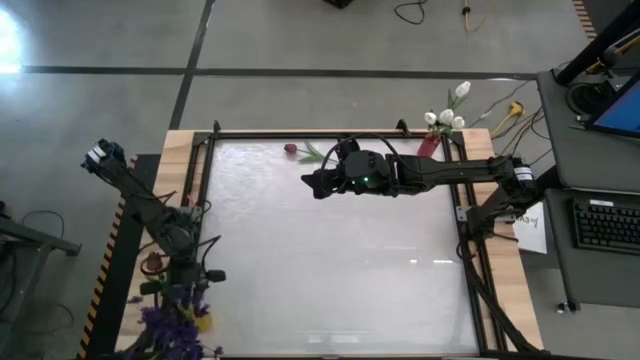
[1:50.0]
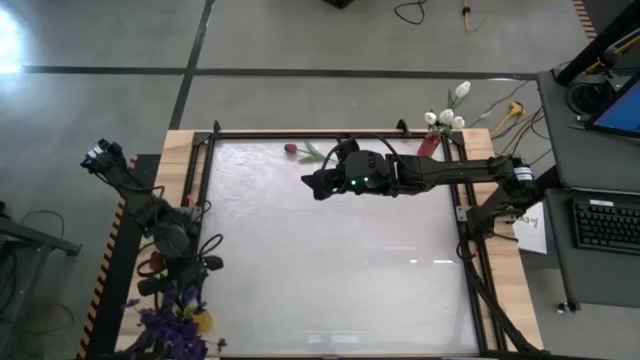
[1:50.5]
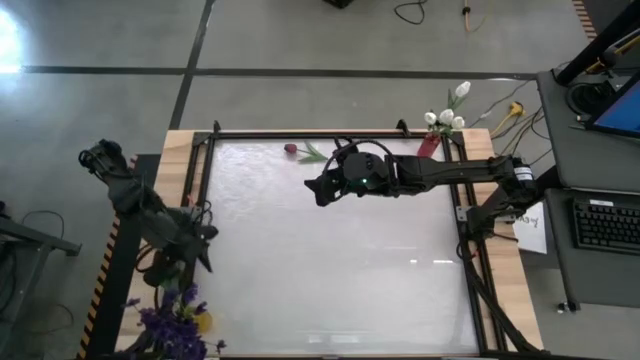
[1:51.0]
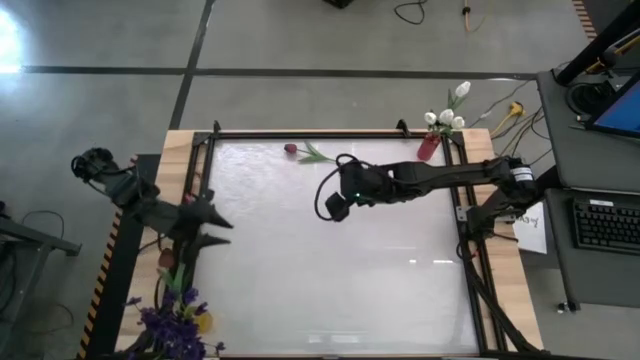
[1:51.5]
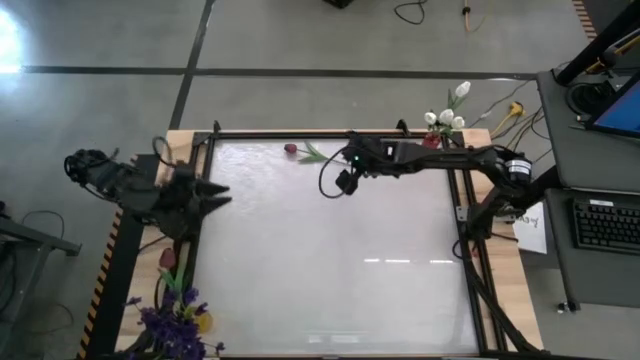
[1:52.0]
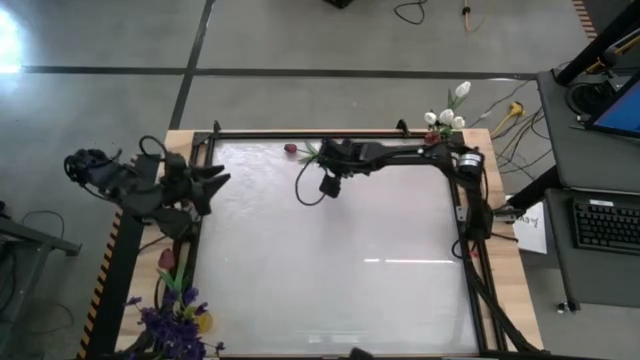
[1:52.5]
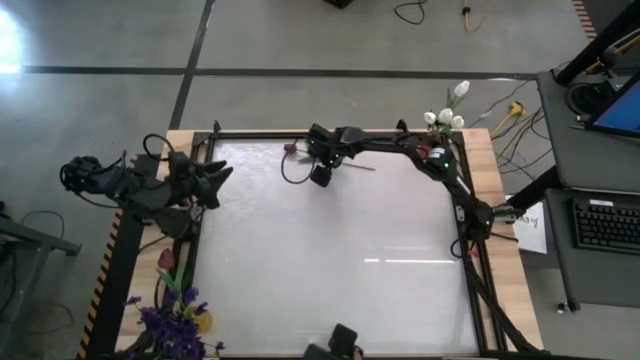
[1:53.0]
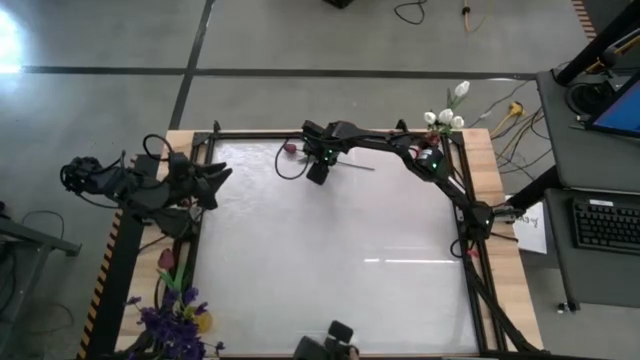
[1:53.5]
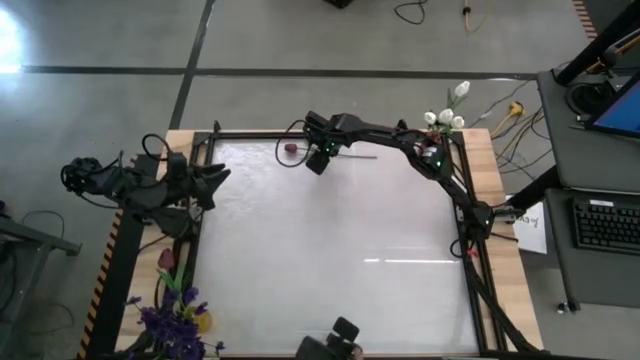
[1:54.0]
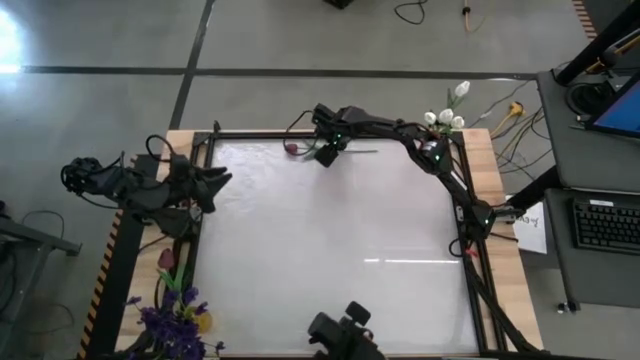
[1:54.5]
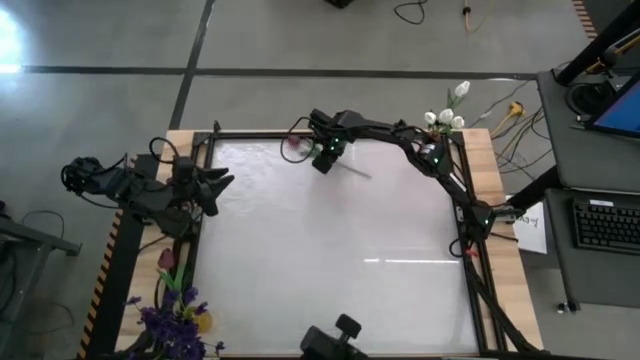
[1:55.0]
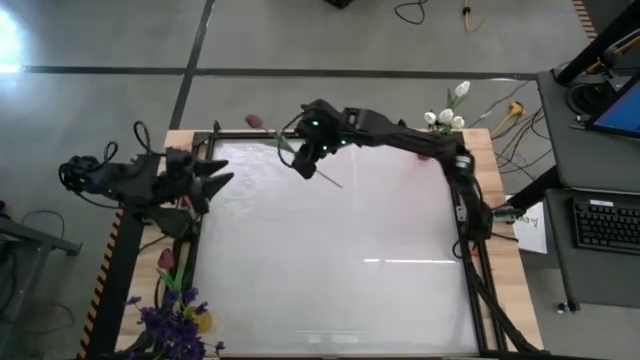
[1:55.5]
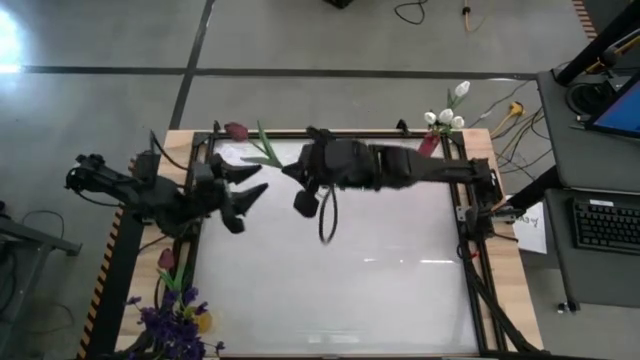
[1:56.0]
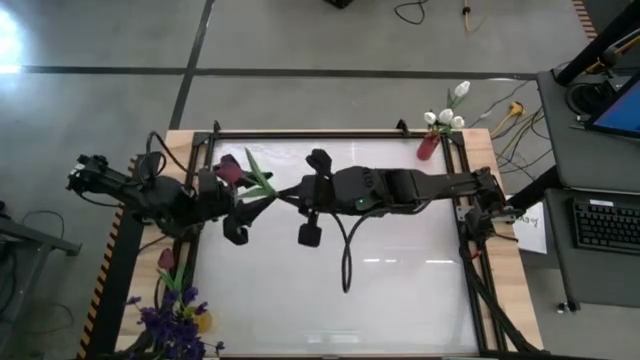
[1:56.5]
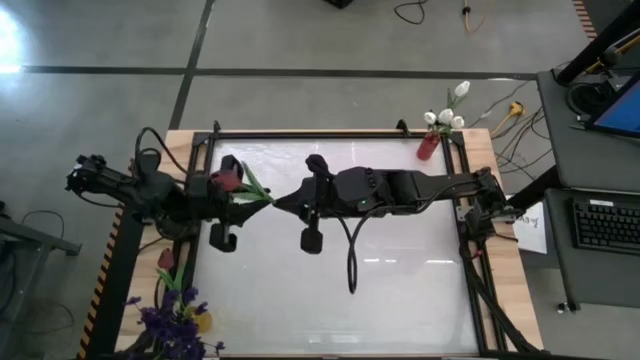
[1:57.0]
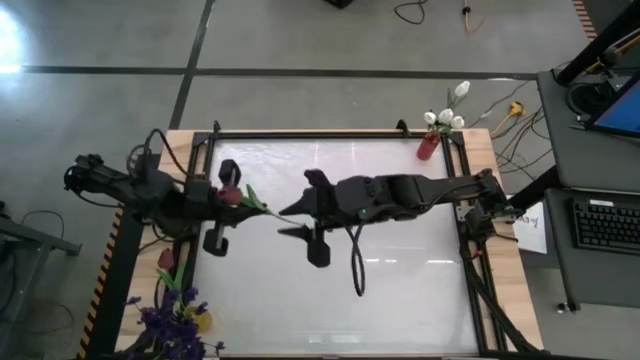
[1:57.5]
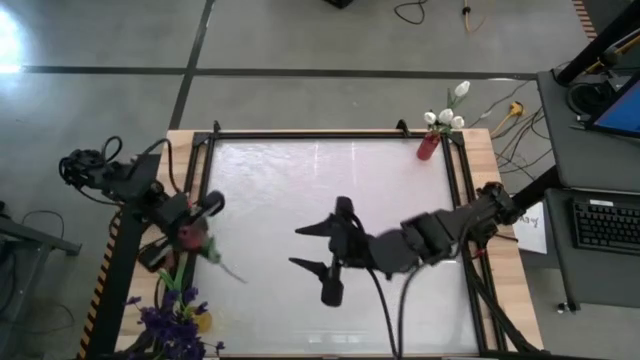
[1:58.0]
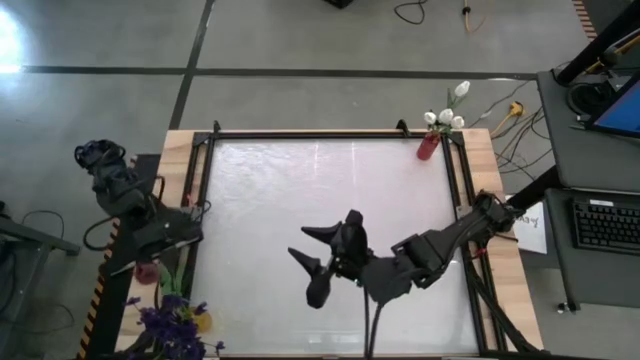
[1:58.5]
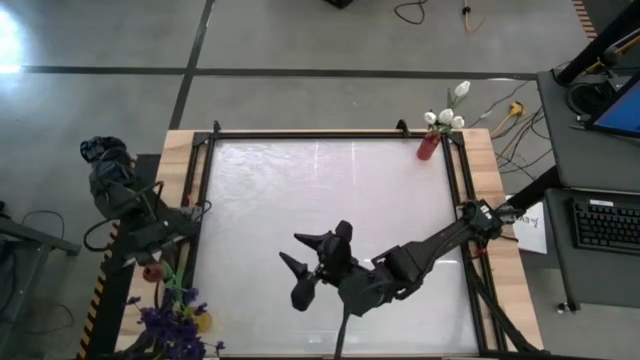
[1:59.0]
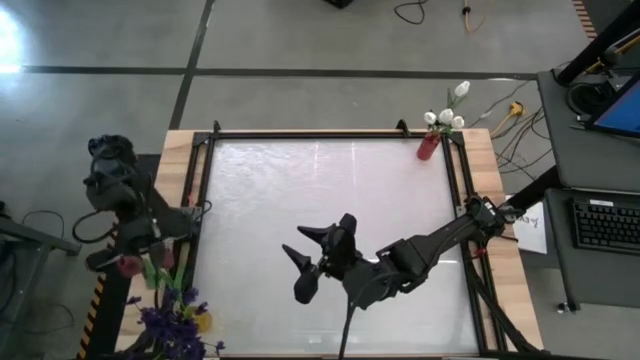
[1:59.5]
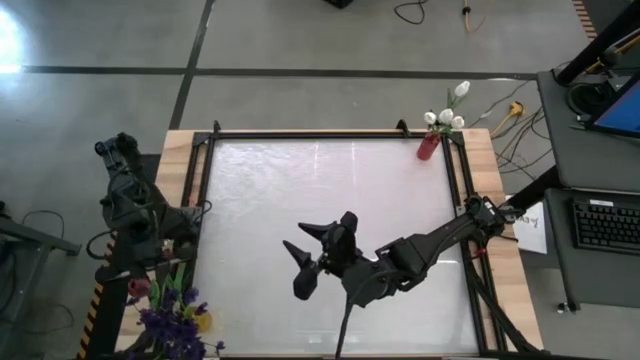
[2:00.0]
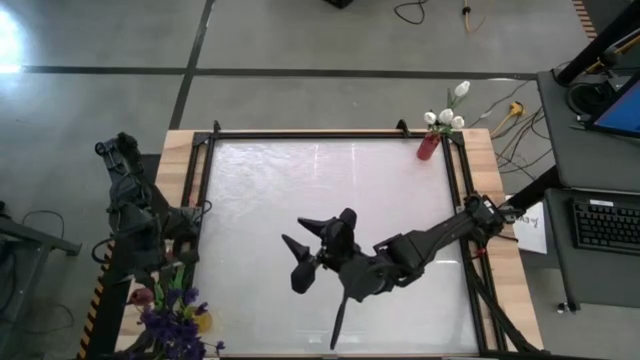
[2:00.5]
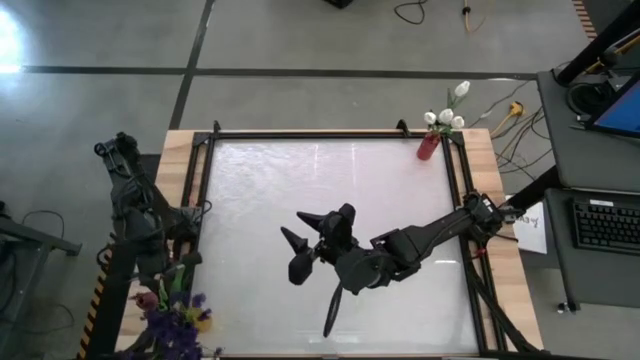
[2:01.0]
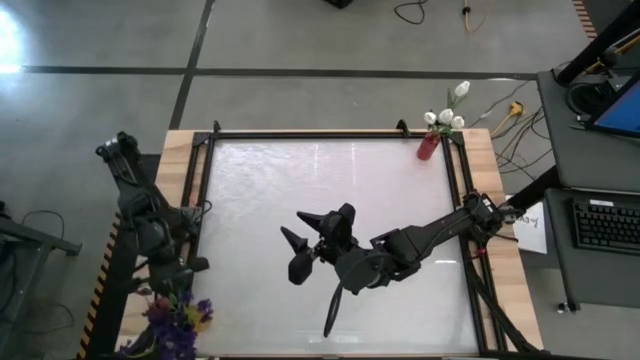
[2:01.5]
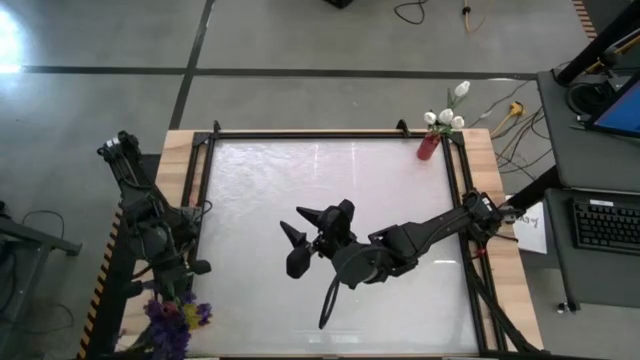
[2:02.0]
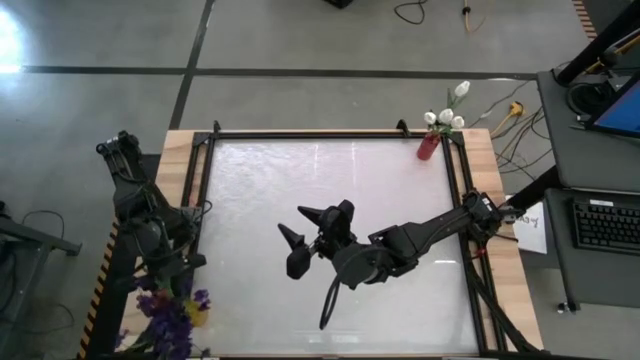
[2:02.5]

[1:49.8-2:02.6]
Task: Sort flowers into vase by color
Put the red tulip into the yellow flower vase

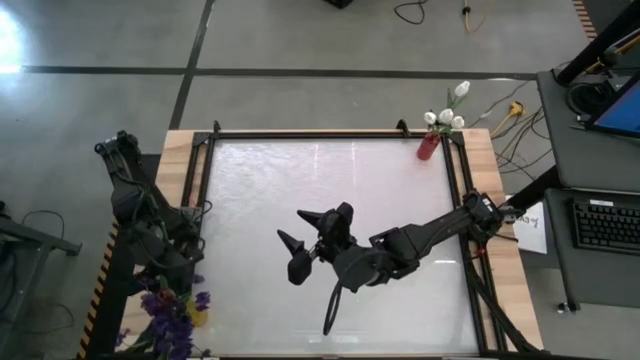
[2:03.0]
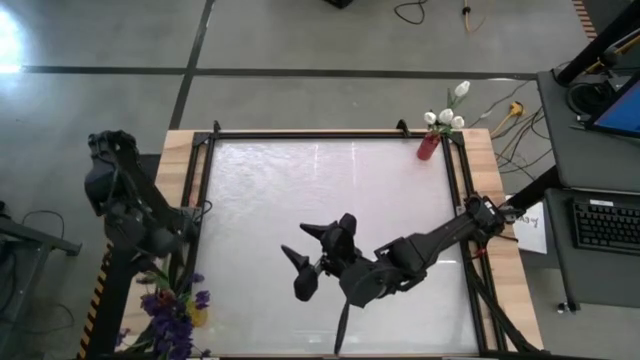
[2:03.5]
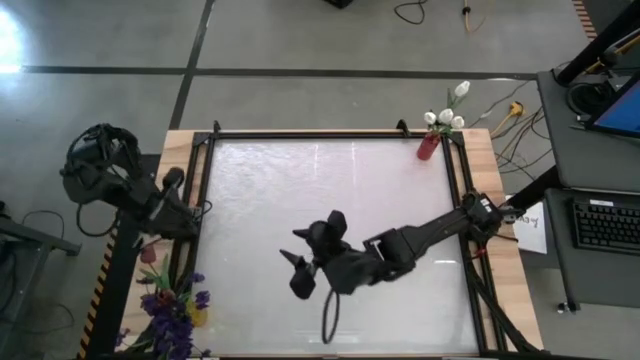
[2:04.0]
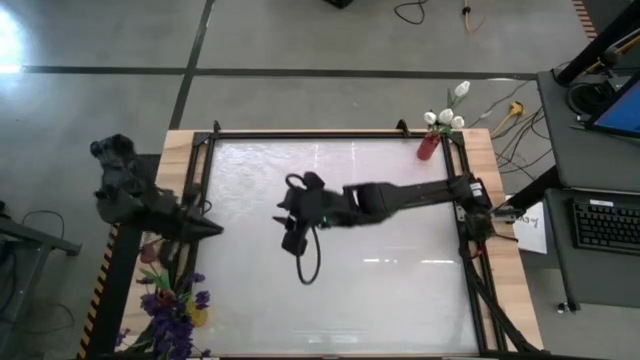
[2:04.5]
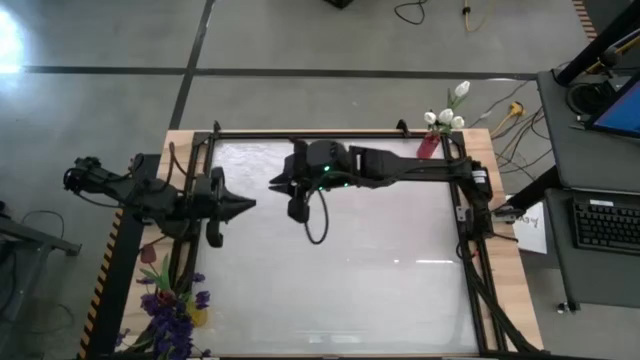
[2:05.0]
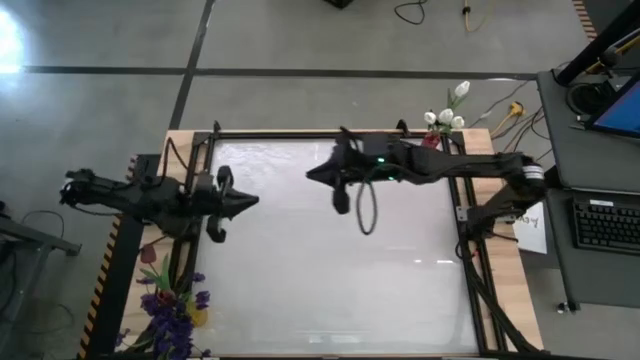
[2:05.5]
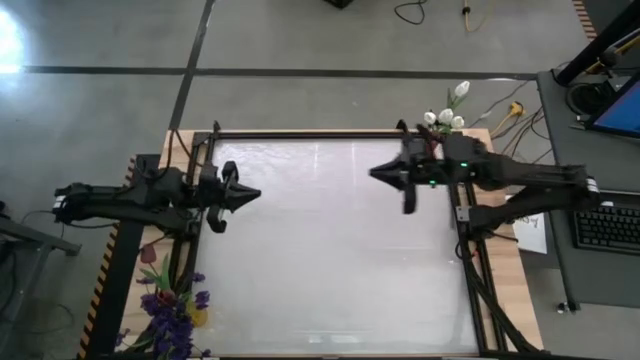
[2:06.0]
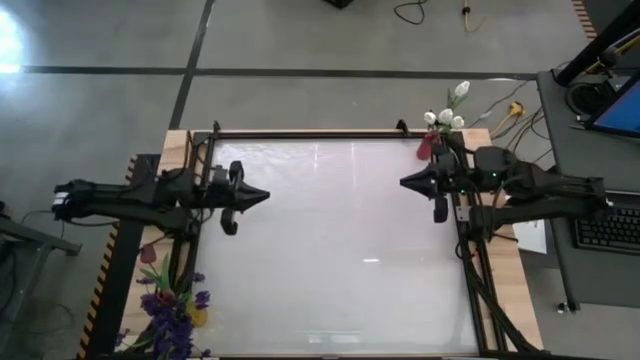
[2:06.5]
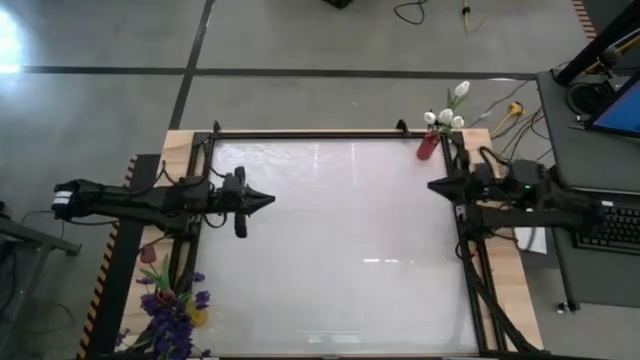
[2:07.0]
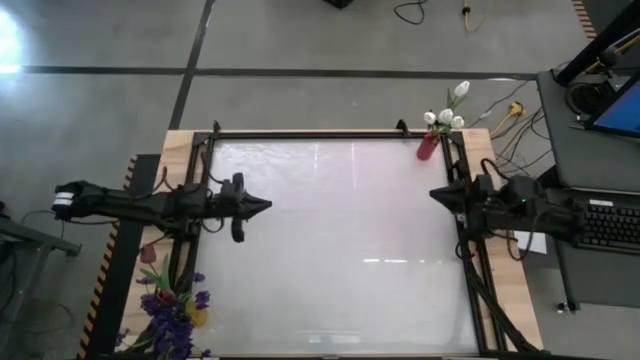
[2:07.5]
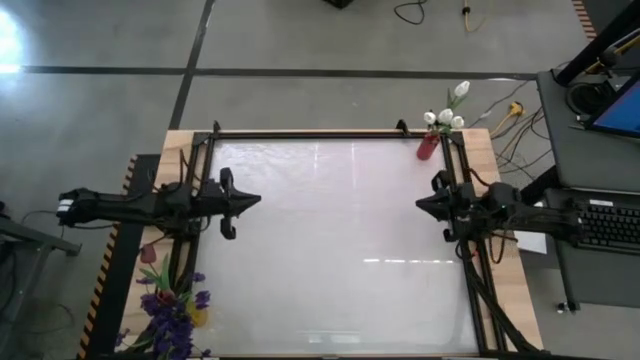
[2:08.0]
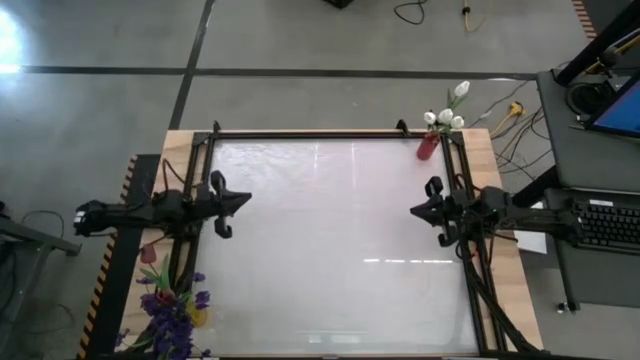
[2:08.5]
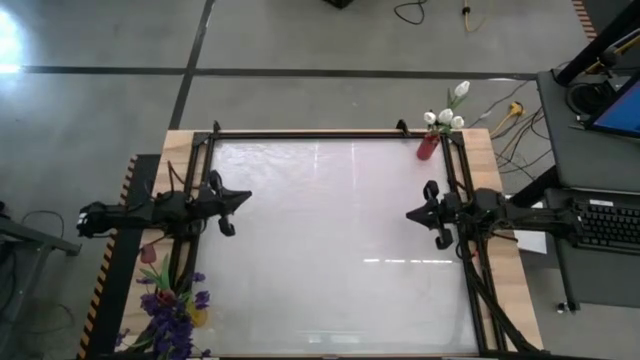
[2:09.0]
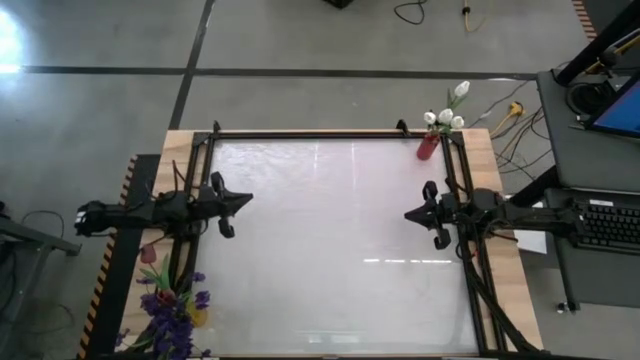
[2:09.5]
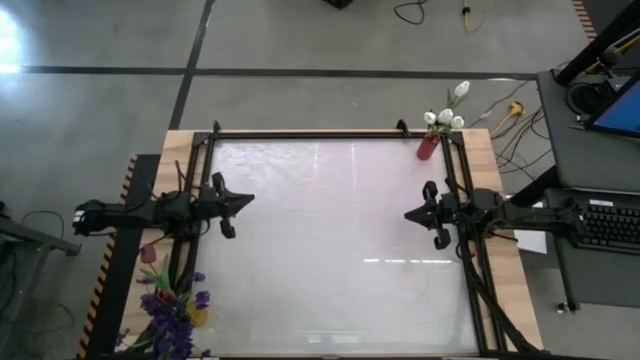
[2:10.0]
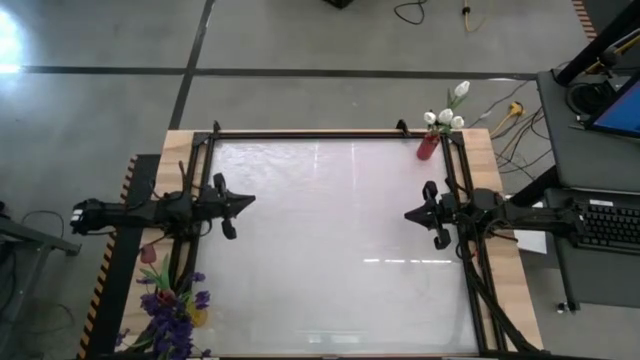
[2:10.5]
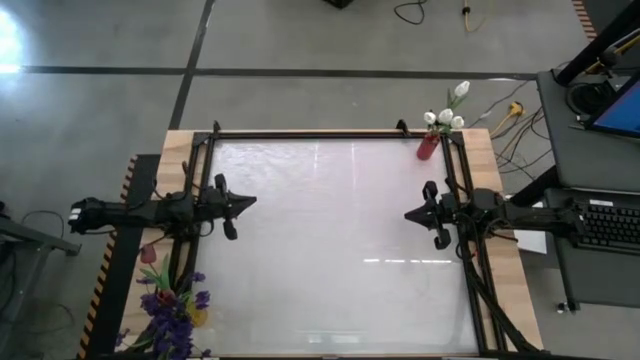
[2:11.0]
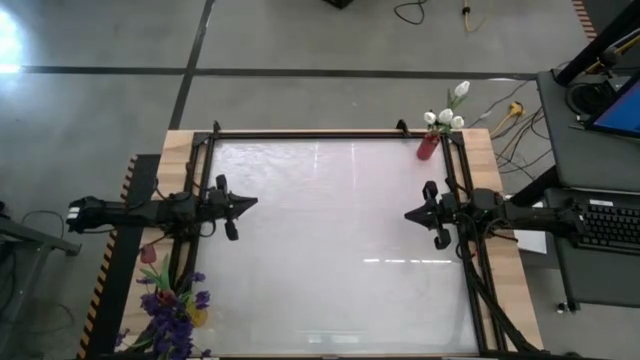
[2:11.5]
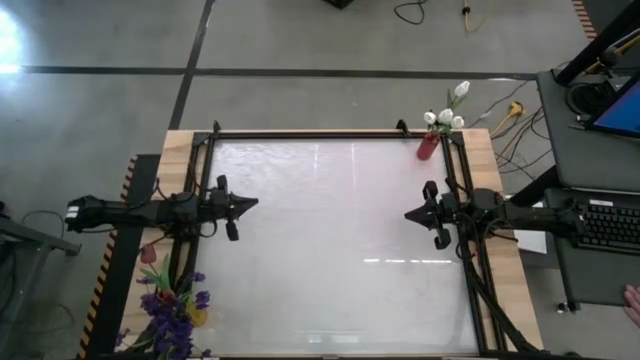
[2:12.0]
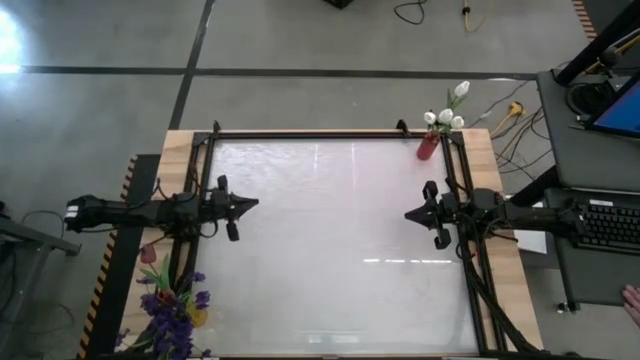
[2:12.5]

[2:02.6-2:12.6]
Return to Home Position
